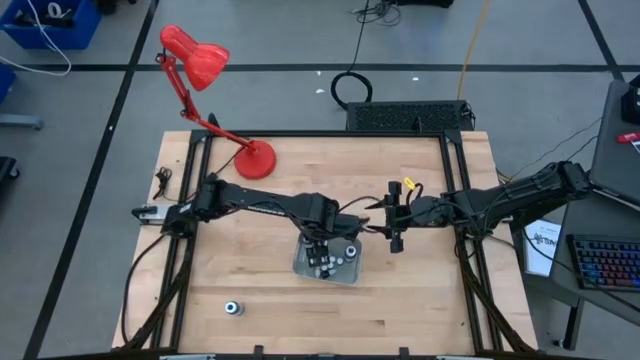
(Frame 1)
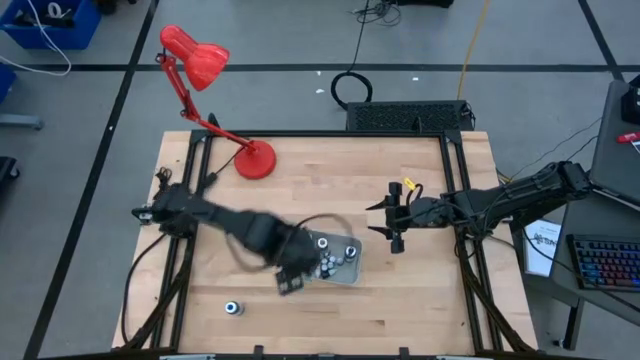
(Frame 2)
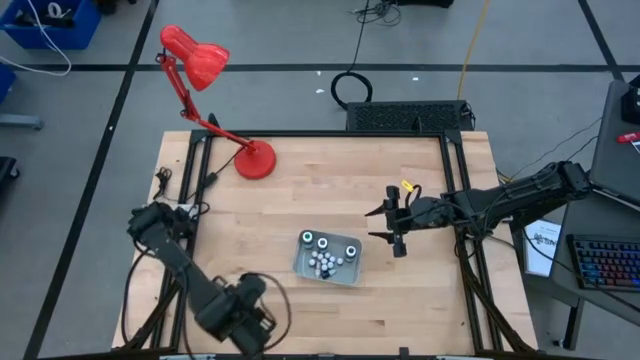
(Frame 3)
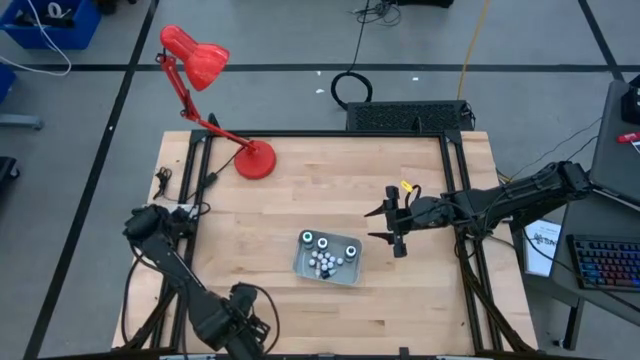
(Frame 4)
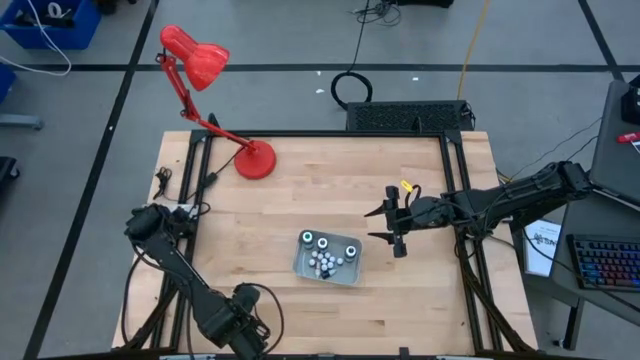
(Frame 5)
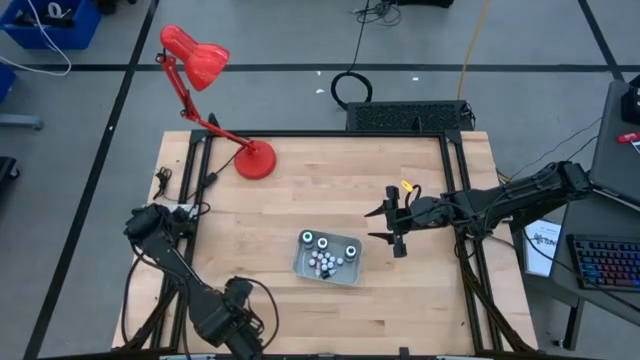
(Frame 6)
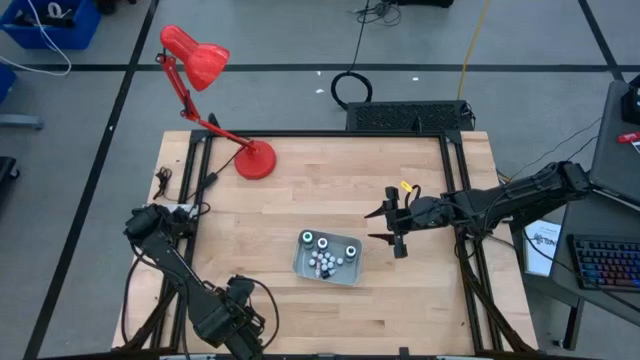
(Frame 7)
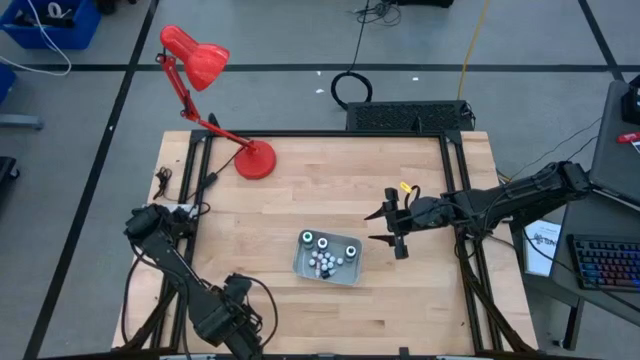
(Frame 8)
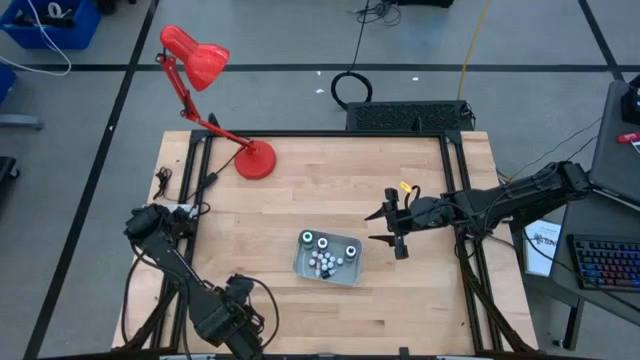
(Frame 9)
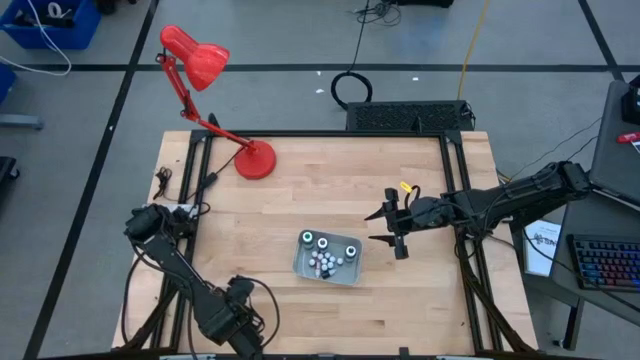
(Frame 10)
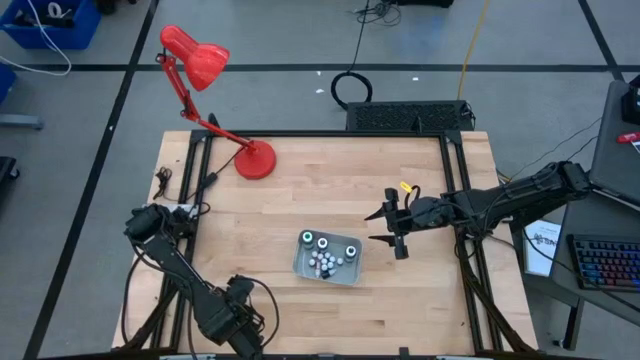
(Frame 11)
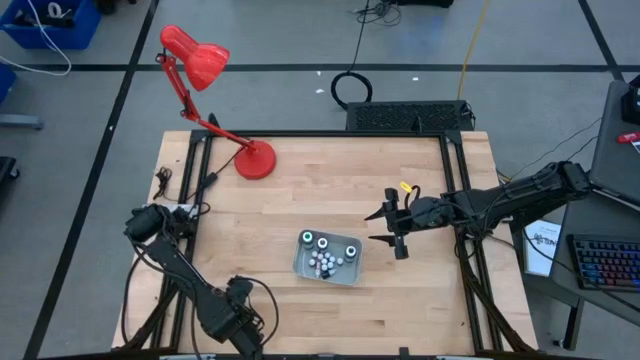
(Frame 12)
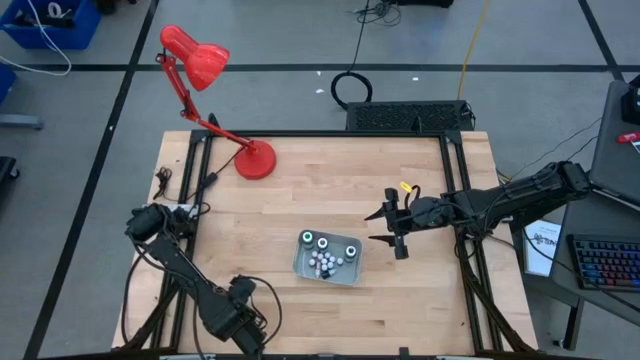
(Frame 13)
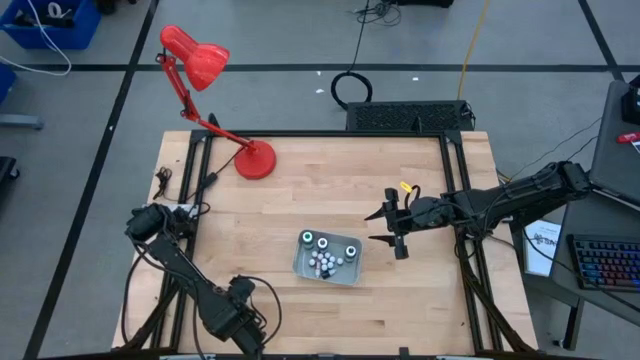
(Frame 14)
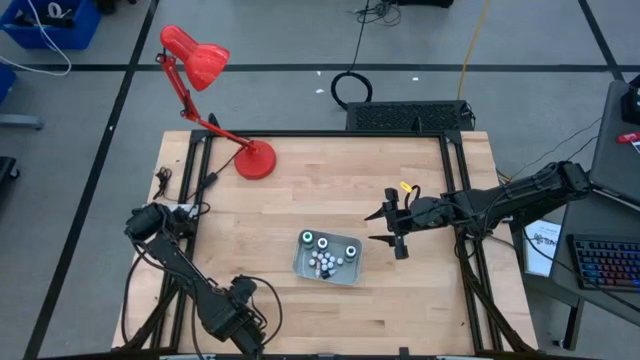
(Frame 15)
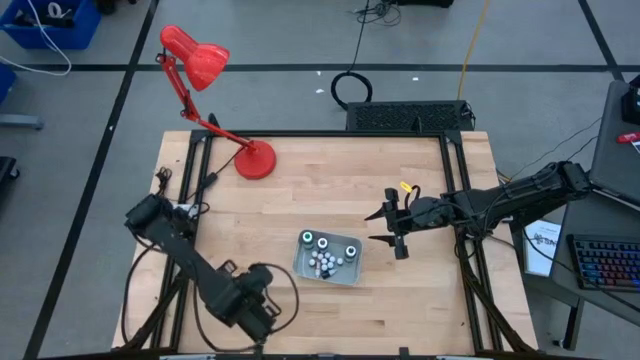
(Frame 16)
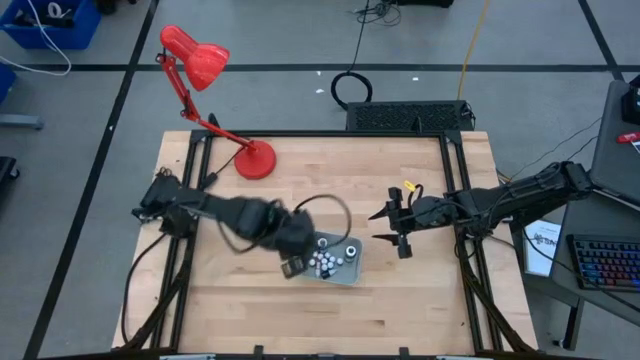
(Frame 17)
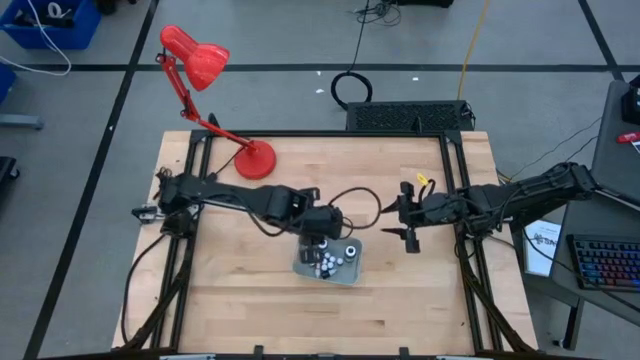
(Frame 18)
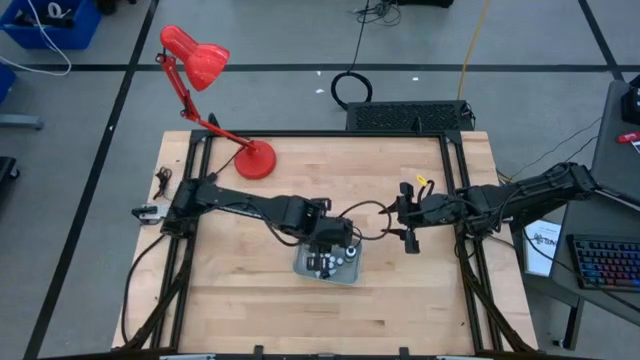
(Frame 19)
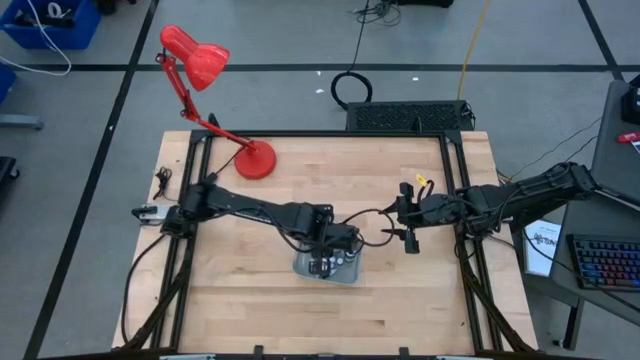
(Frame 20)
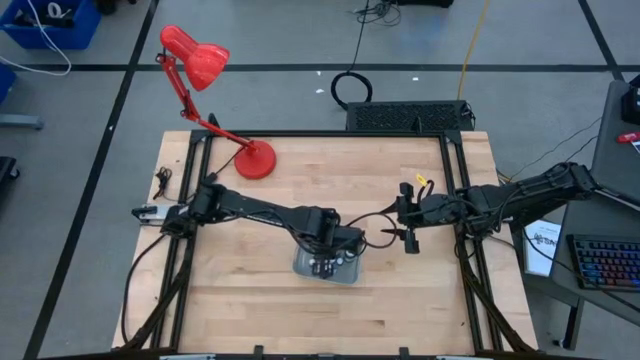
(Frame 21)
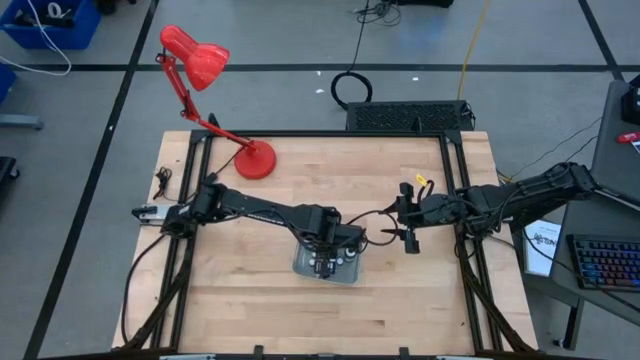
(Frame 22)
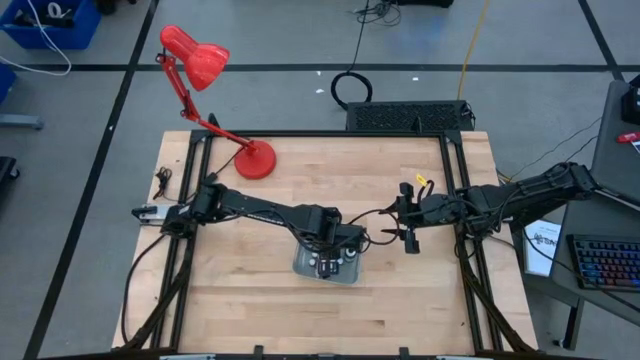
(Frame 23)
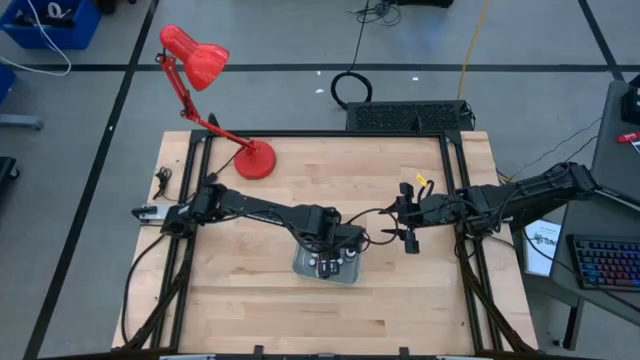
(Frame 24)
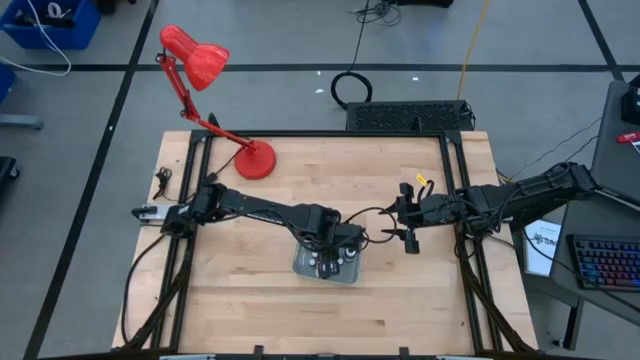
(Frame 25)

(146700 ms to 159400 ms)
Task: Pick & Place food coloring
Put the large blue food coloring bottle into the gray bin

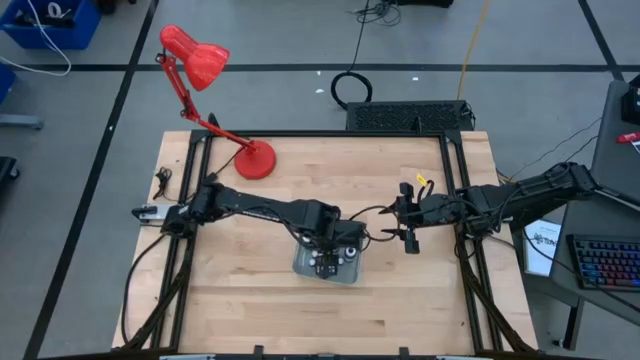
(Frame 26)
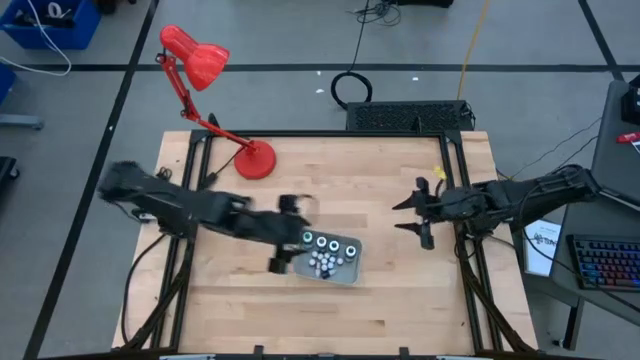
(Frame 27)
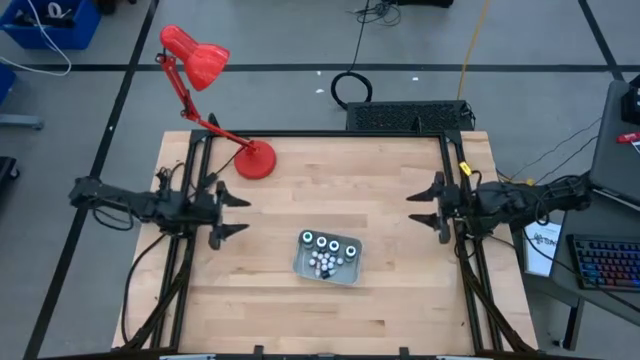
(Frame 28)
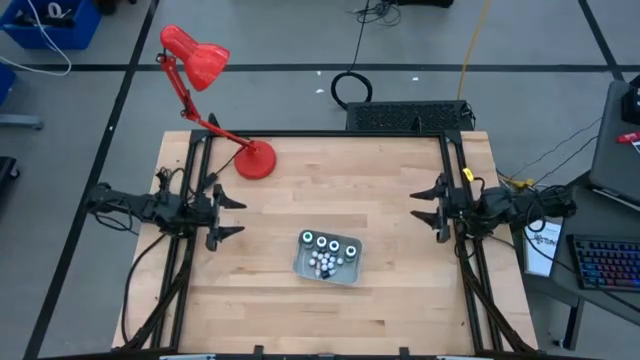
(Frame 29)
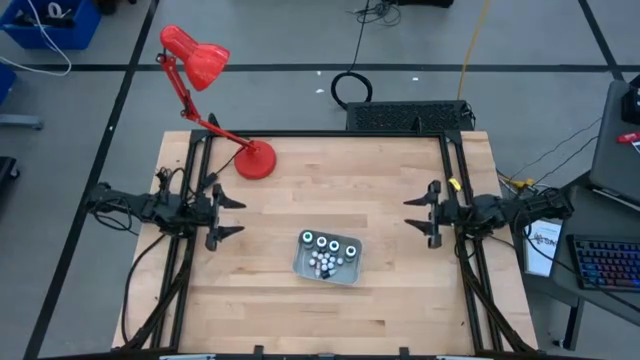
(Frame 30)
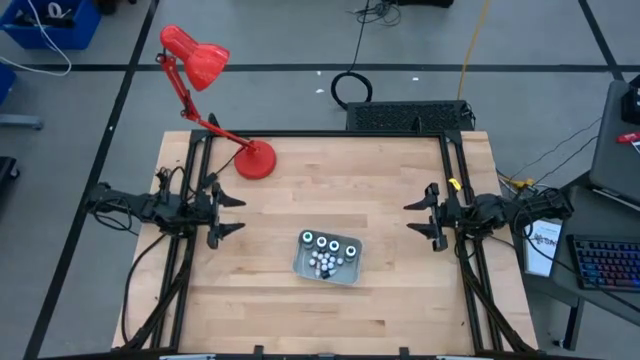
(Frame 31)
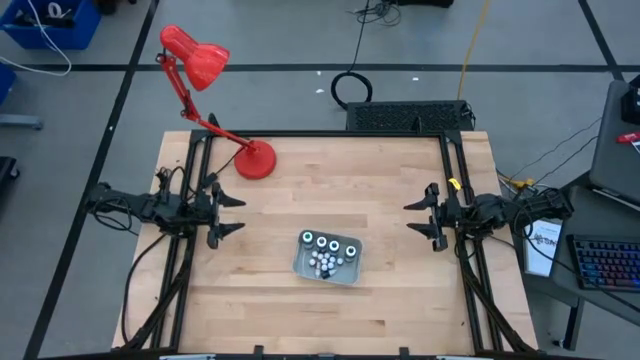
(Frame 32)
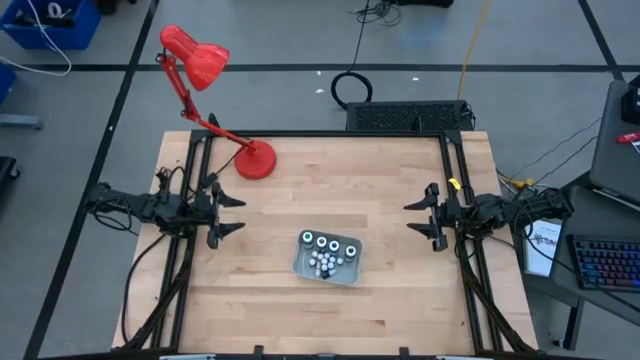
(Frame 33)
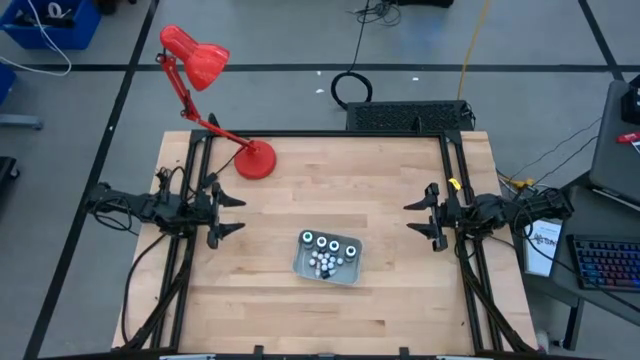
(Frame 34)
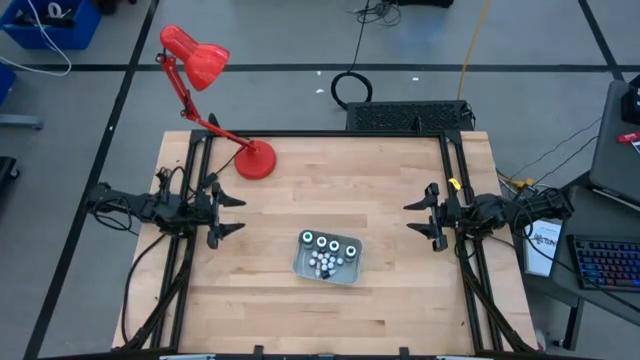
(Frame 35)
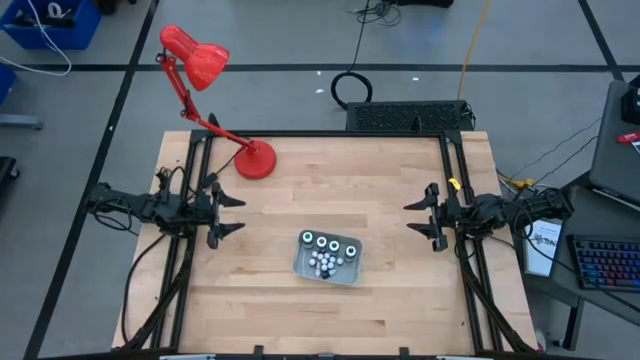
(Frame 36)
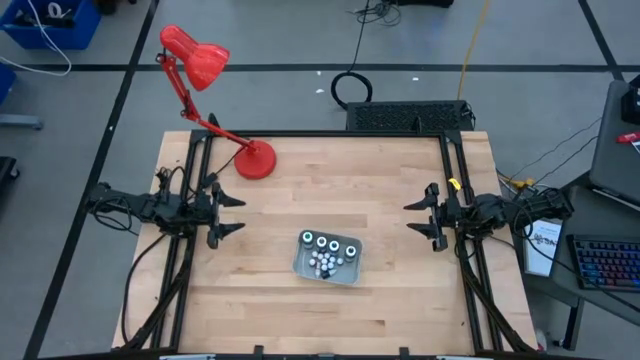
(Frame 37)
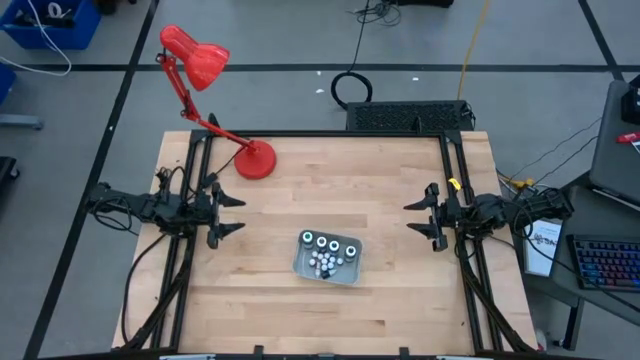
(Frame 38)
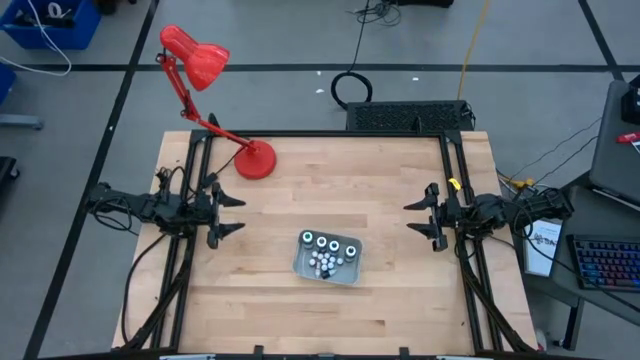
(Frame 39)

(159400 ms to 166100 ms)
Return to Home Position

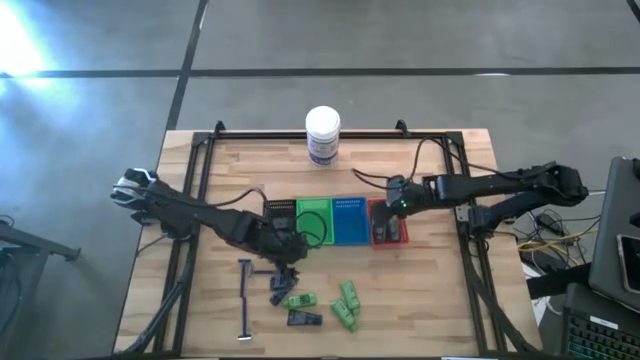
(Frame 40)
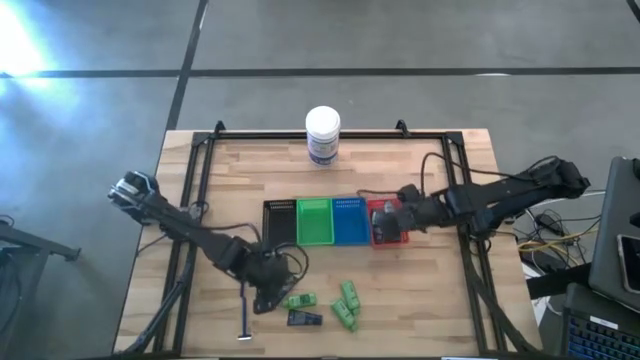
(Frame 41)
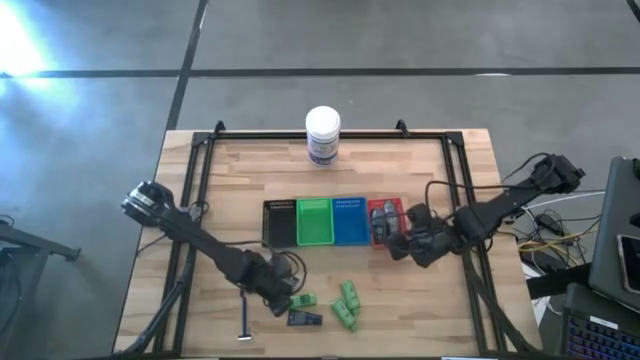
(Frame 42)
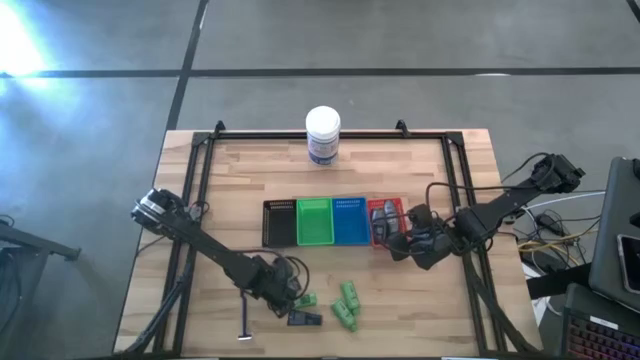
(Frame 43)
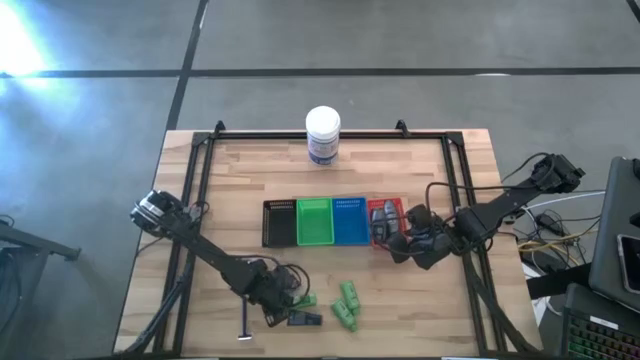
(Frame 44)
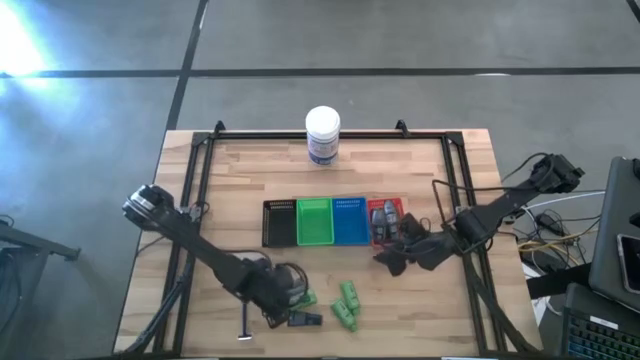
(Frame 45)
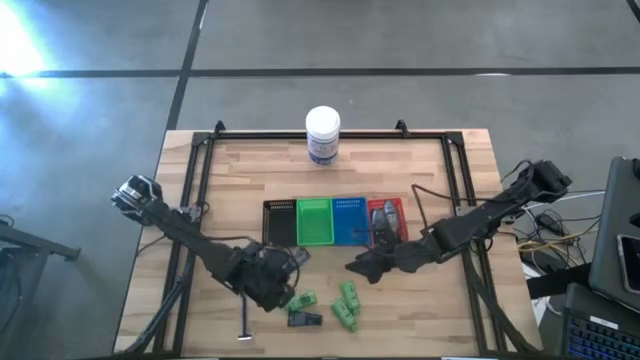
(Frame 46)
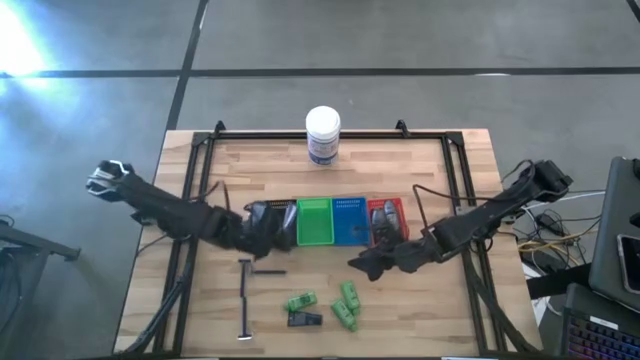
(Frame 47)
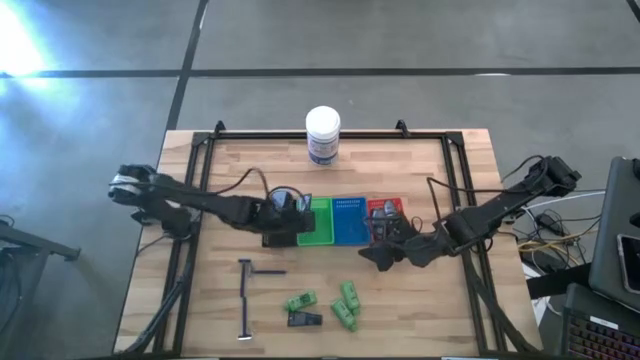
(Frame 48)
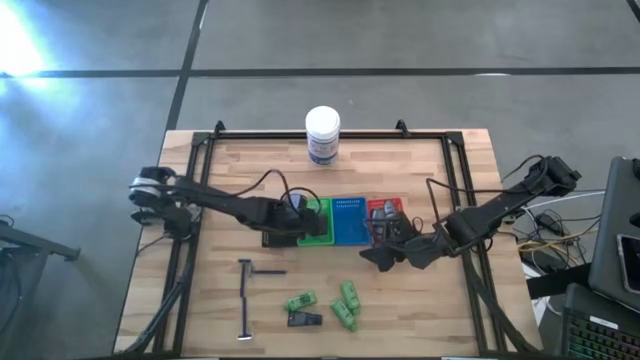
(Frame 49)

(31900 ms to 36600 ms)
Task: Pick & Place Travel size toiletries
Put the blue shave cream into the green bin
